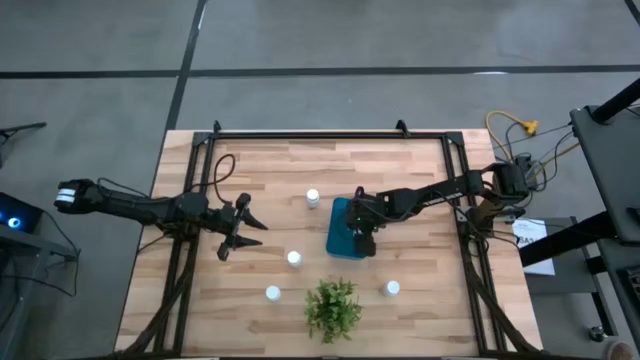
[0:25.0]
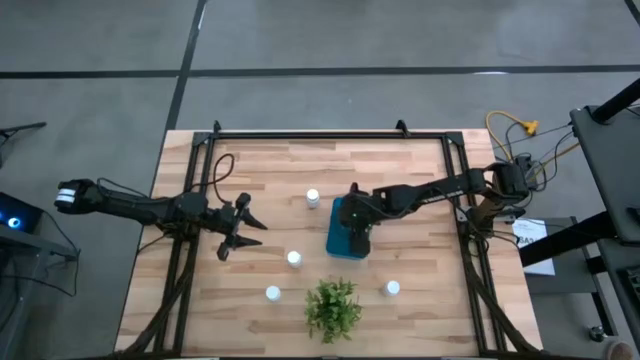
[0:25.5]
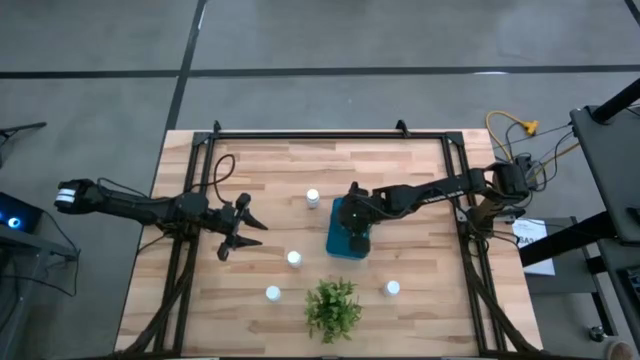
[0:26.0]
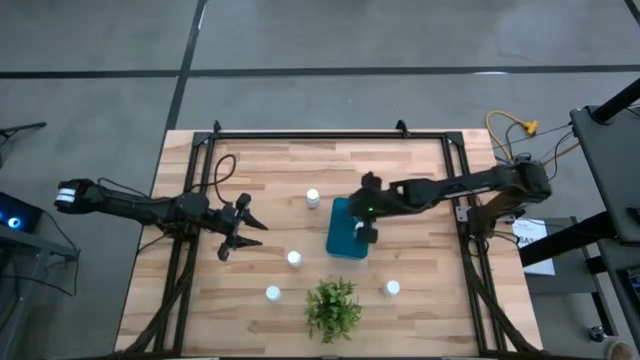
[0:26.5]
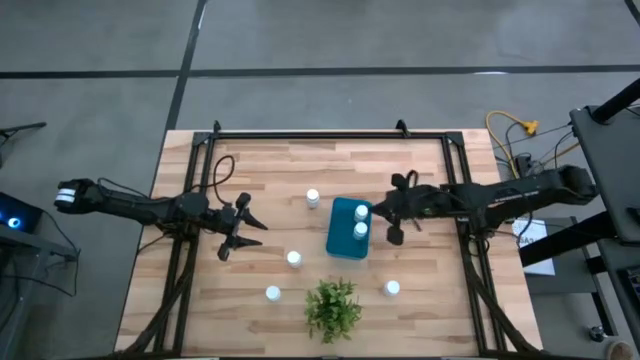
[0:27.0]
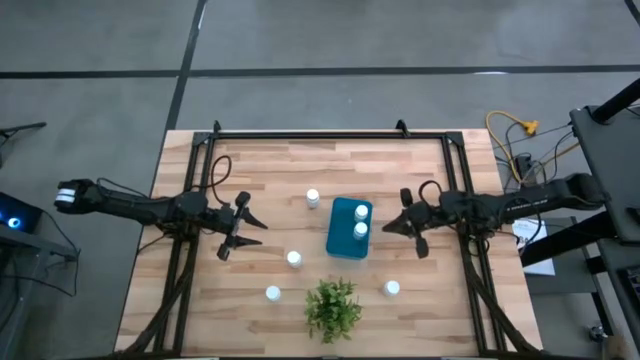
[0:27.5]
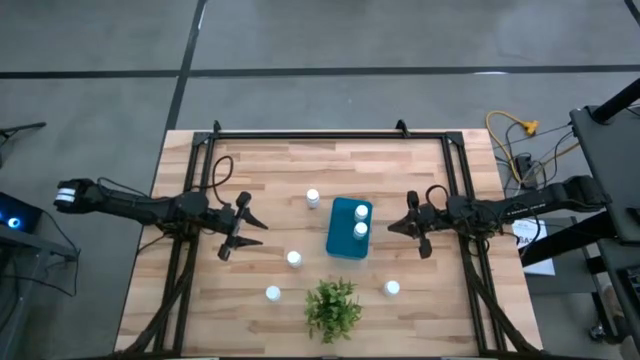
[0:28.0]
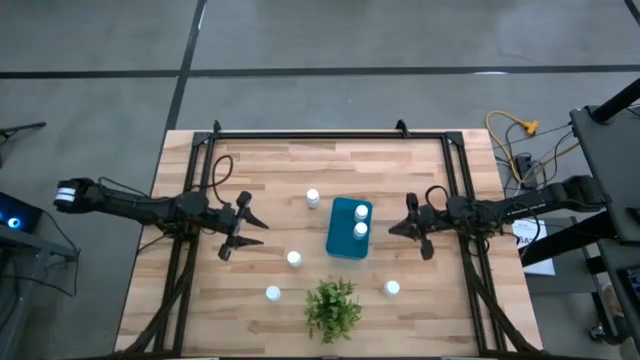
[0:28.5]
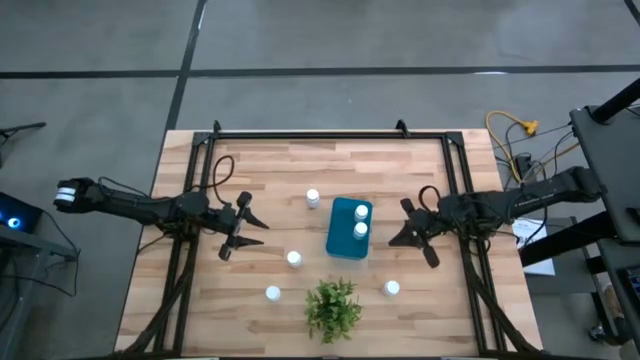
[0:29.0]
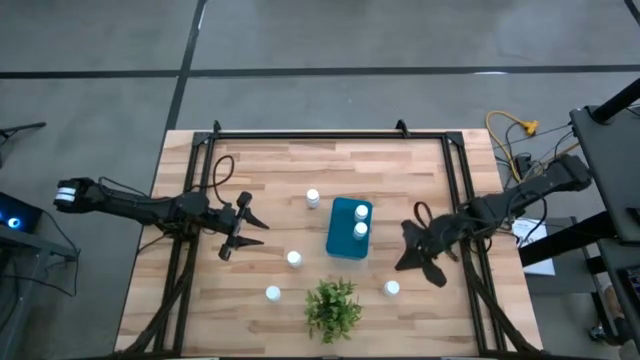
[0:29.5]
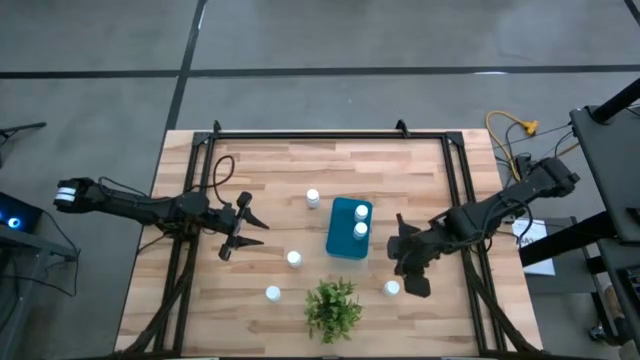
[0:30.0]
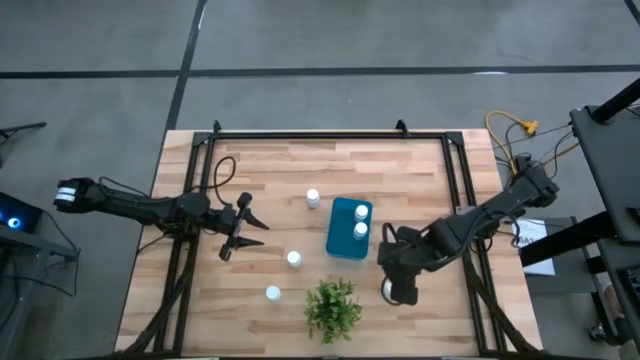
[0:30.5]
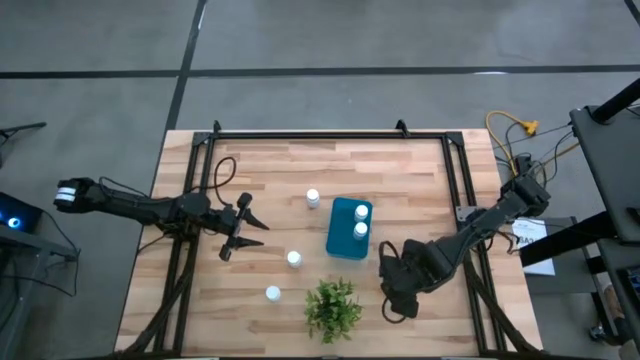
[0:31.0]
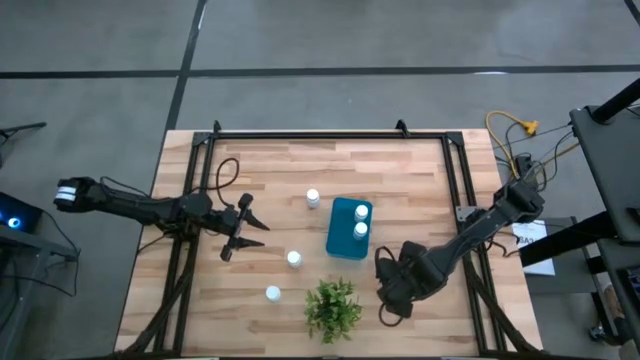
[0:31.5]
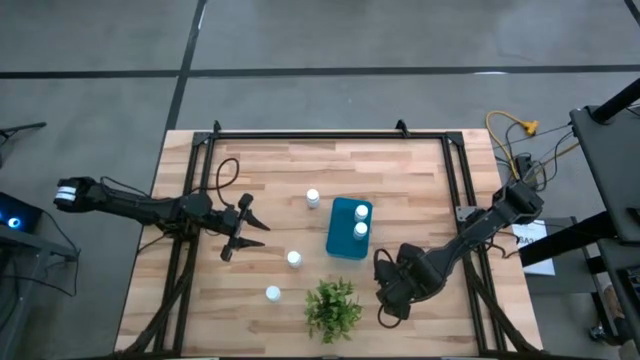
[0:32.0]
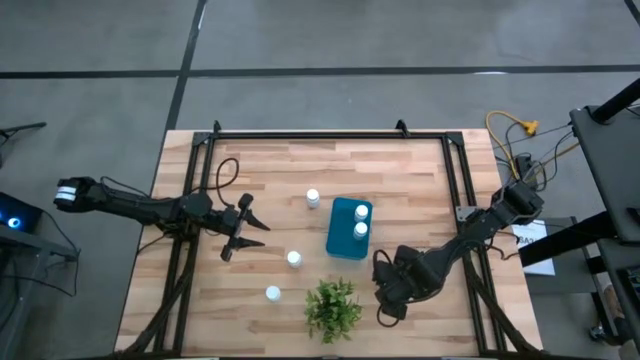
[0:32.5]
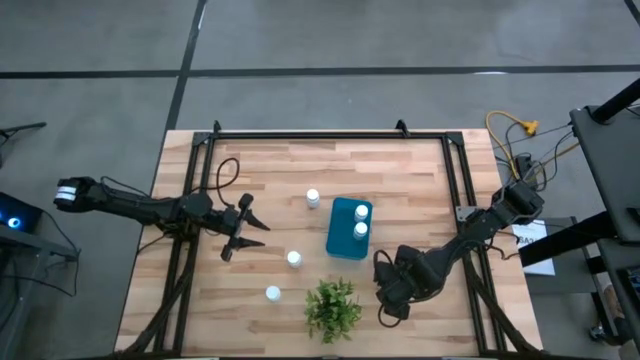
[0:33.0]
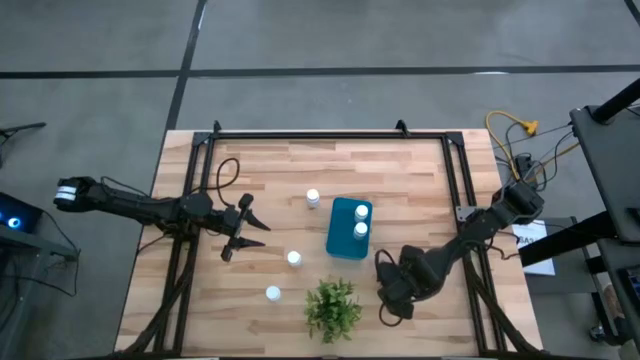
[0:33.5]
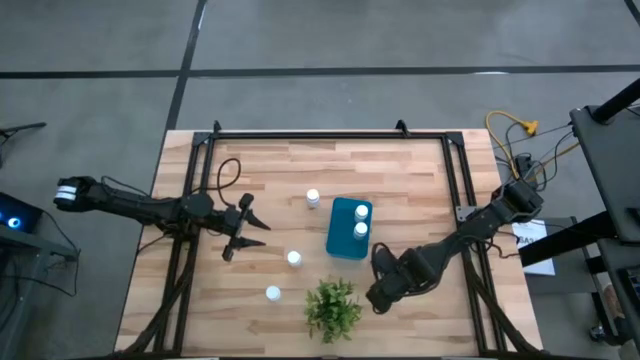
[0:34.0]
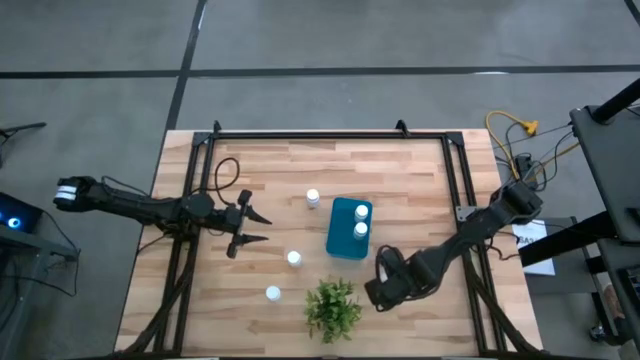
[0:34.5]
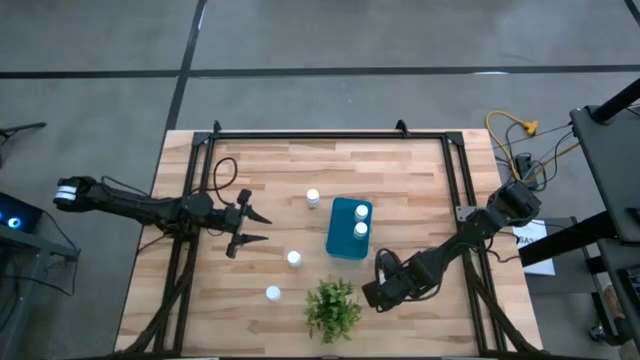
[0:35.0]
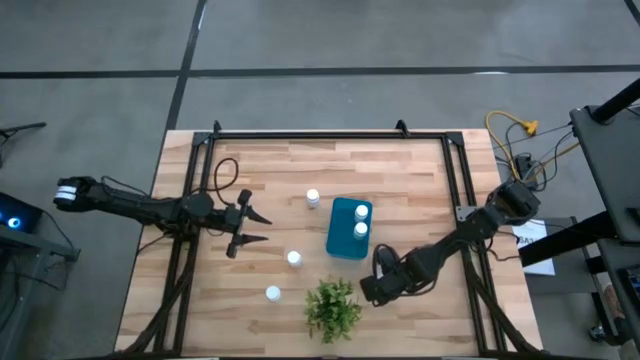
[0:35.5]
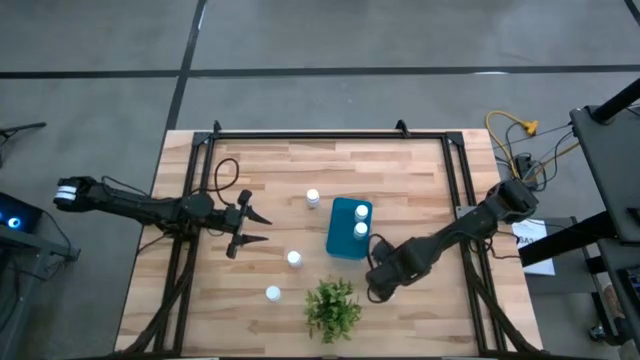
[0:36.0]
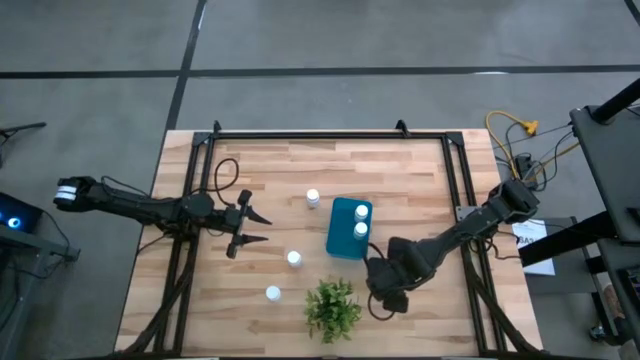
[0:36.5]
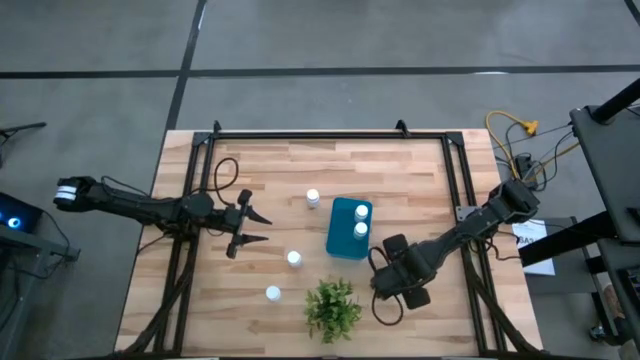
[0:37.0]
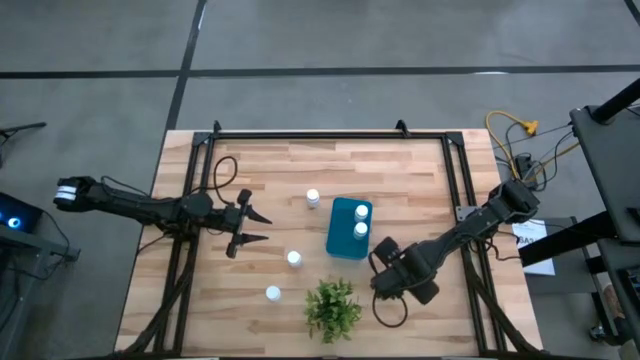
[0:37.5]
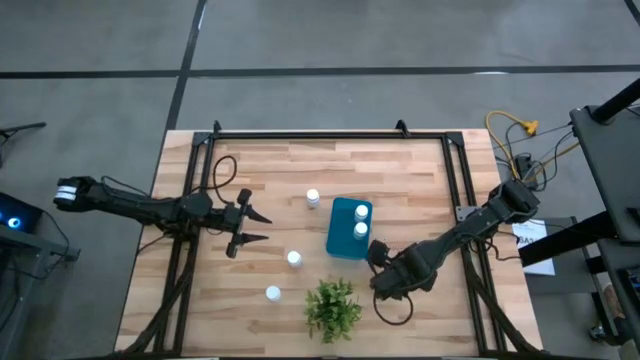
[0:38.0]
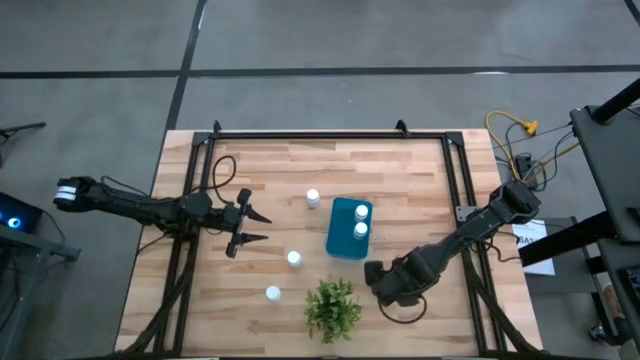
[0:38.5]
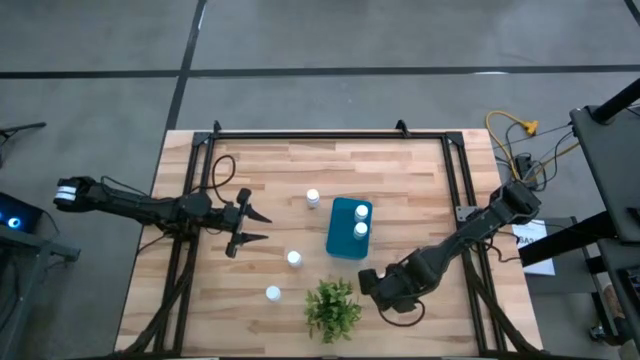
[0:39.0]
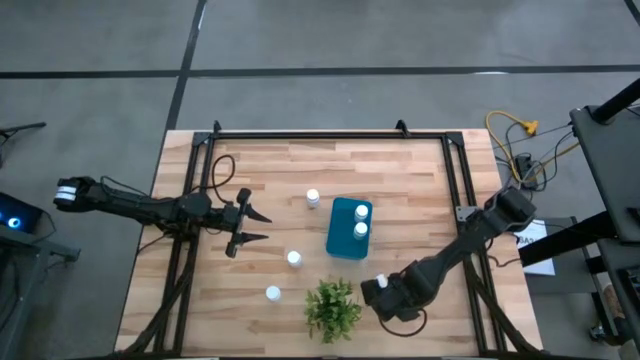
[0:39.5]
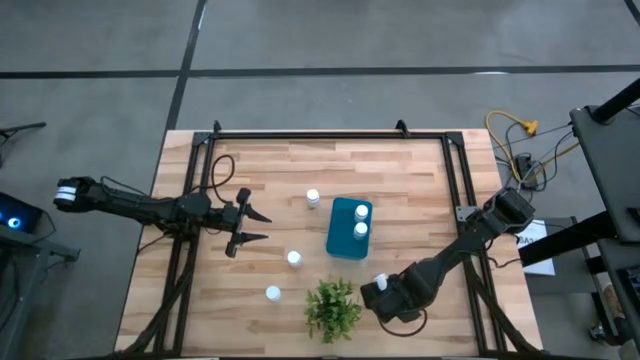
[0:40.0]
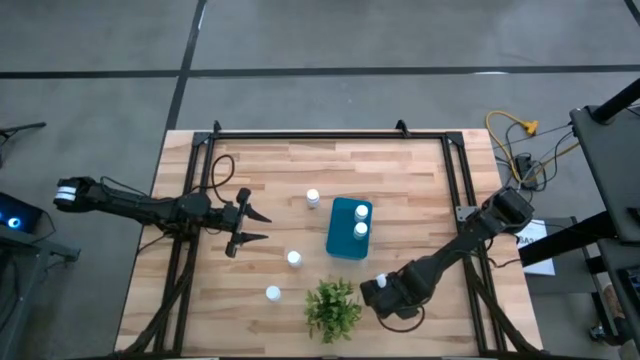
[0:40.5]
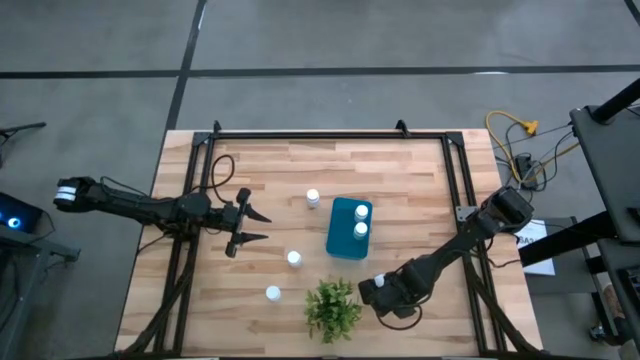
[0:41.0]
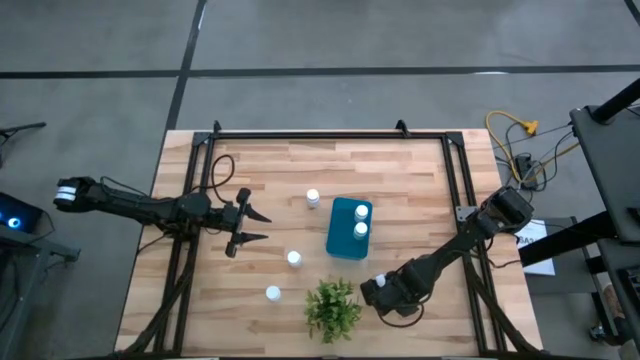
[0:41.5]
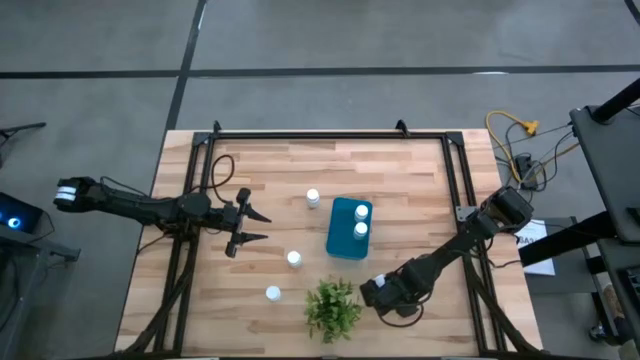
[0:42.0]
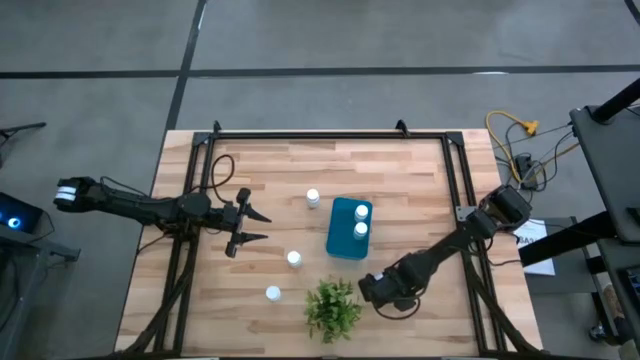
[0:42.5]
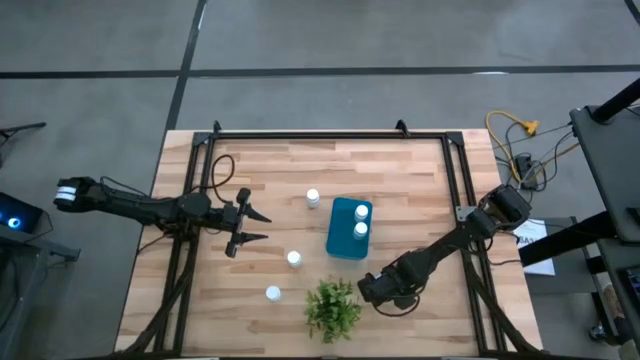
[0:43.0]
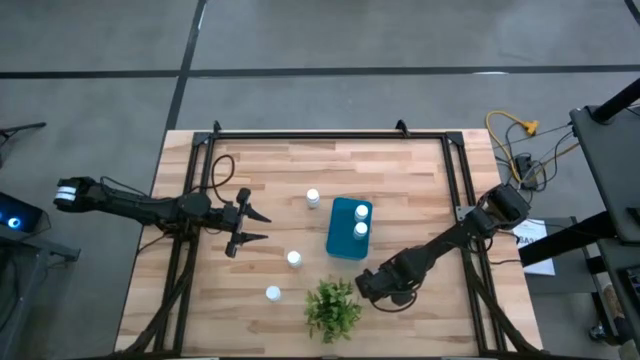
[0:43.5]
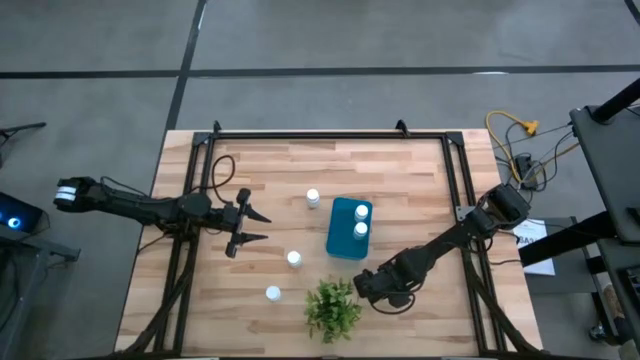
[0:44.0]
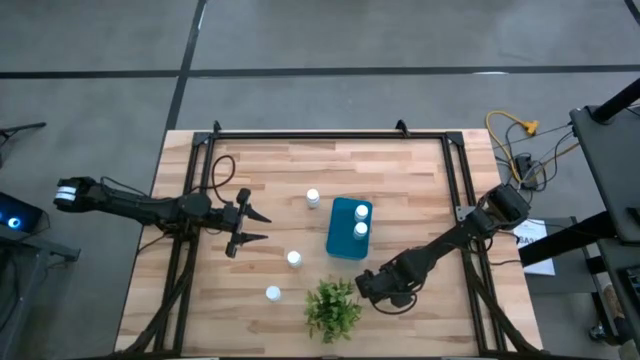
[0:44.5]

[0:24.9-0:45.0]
Task: Pick and place pill bottles into a basket
Put the white pill bottle into the blue bin
